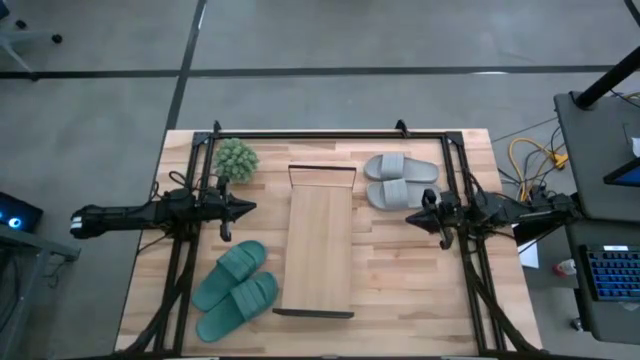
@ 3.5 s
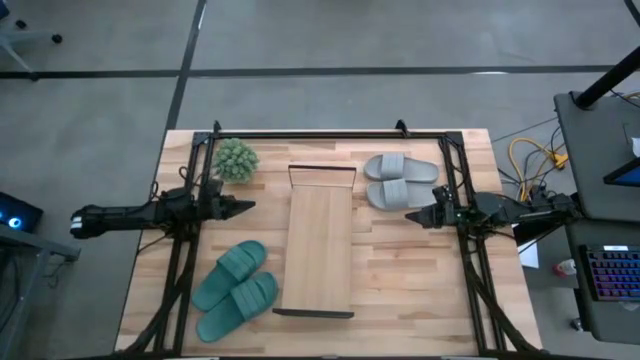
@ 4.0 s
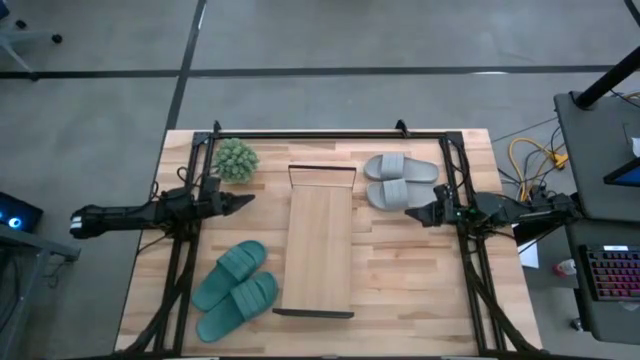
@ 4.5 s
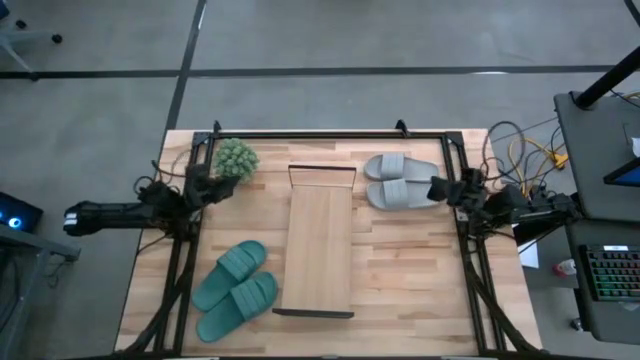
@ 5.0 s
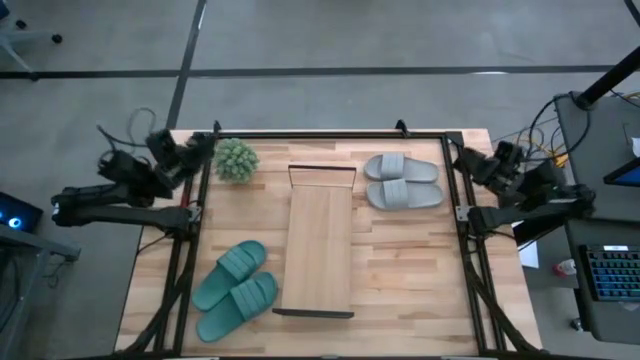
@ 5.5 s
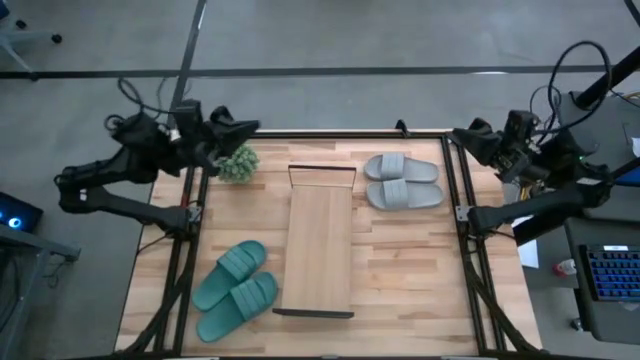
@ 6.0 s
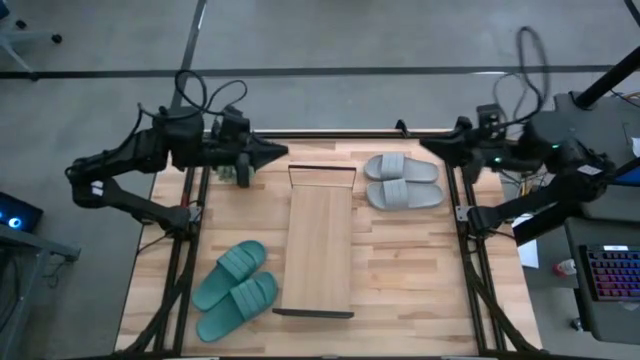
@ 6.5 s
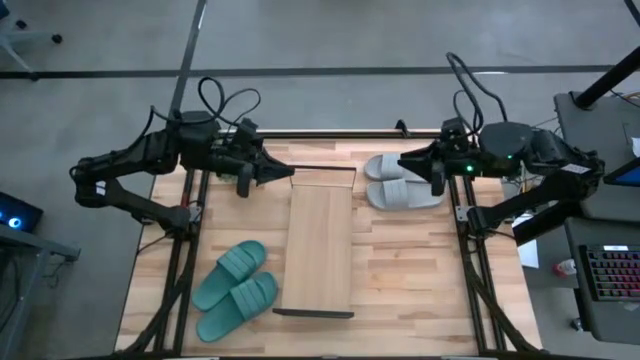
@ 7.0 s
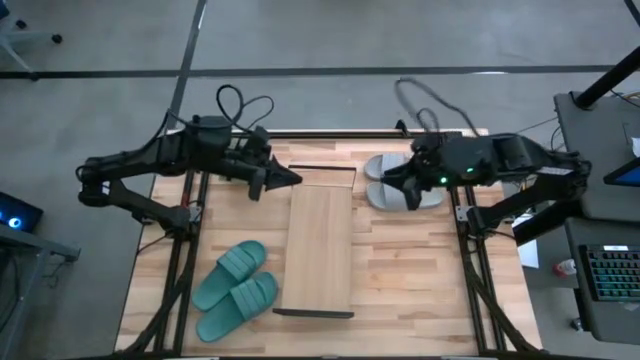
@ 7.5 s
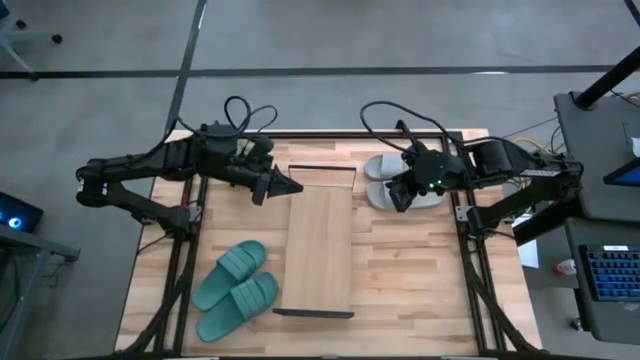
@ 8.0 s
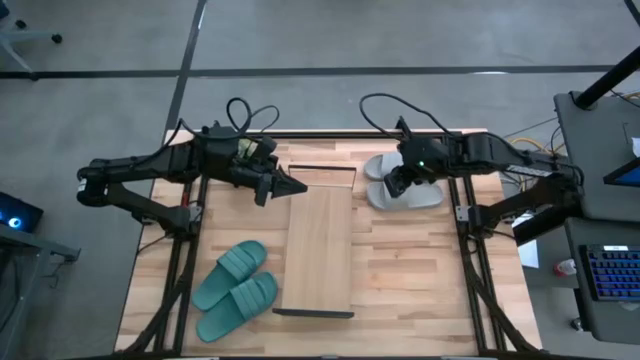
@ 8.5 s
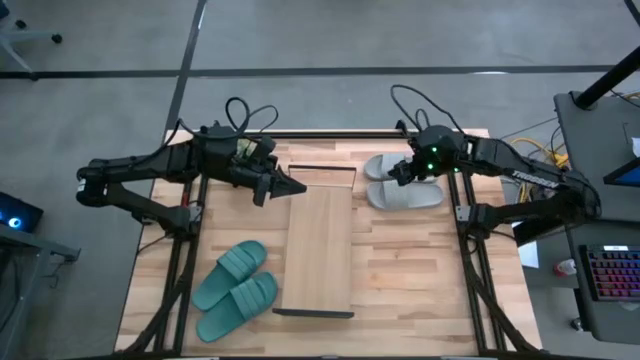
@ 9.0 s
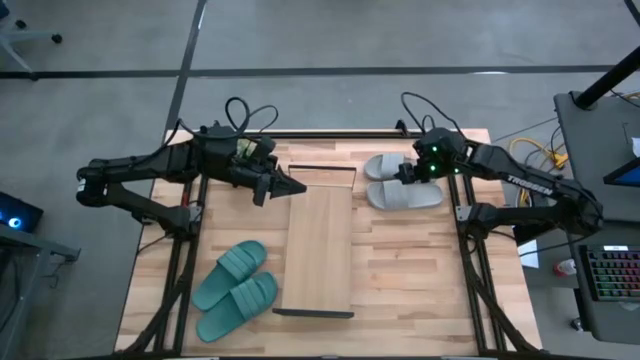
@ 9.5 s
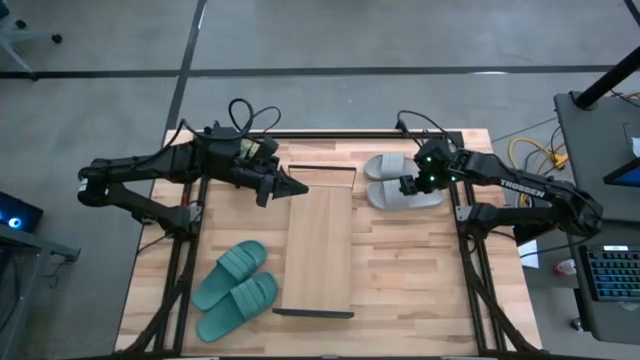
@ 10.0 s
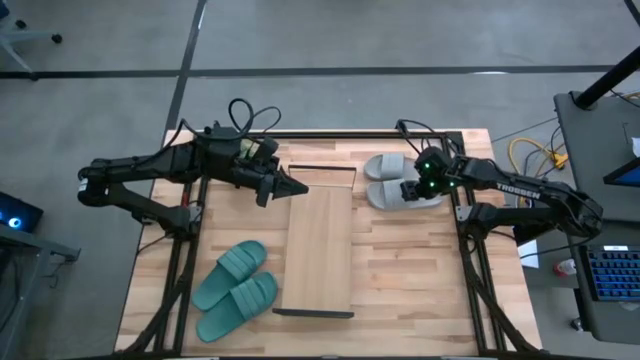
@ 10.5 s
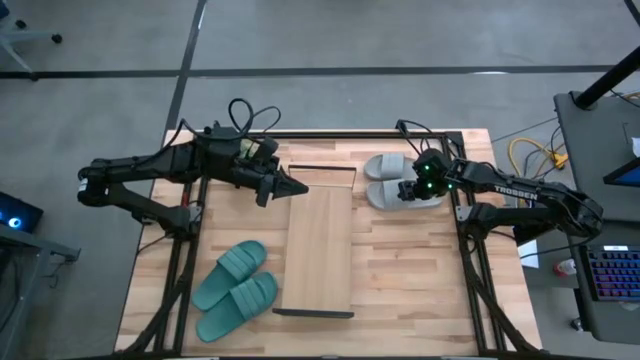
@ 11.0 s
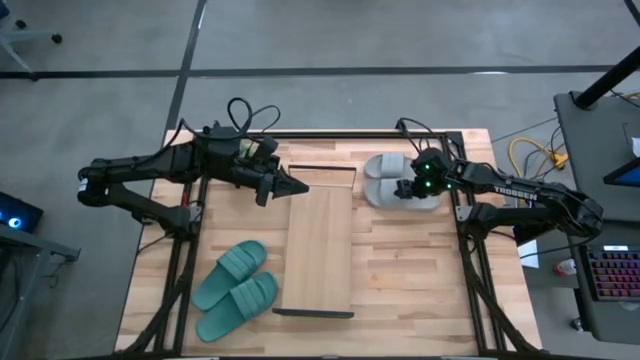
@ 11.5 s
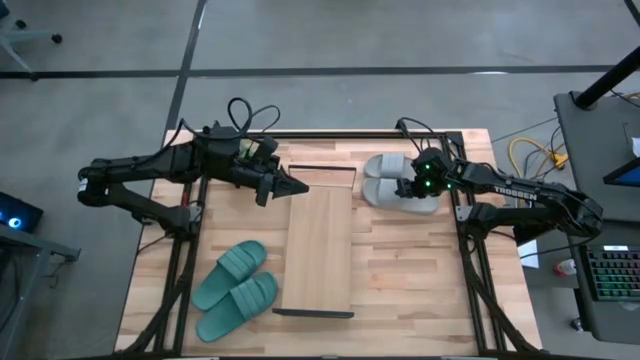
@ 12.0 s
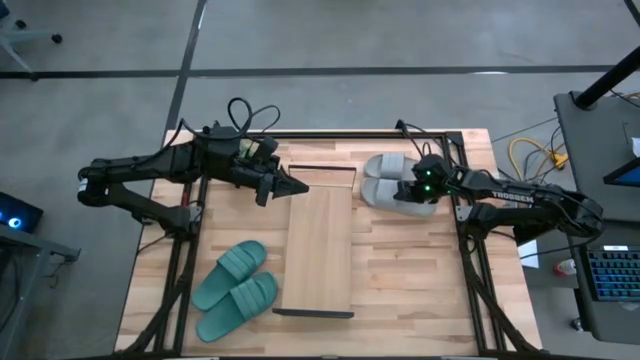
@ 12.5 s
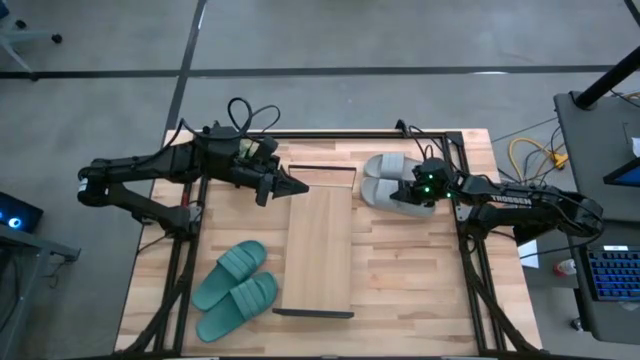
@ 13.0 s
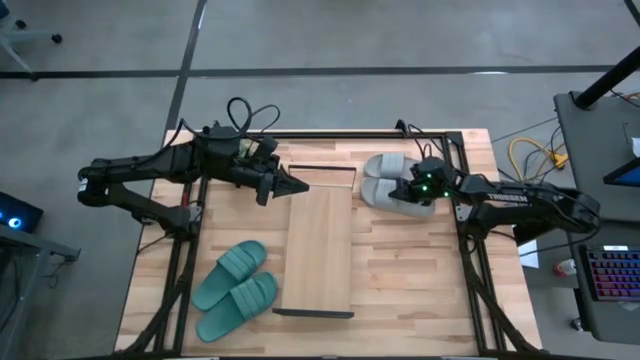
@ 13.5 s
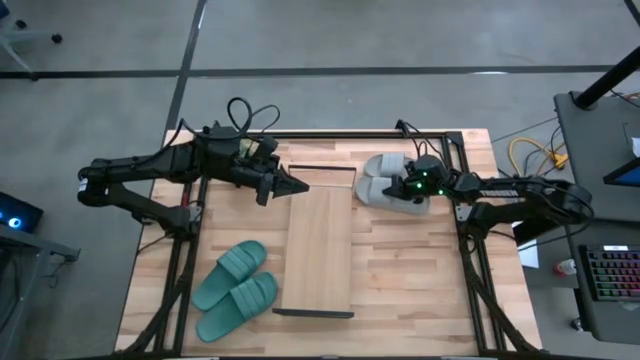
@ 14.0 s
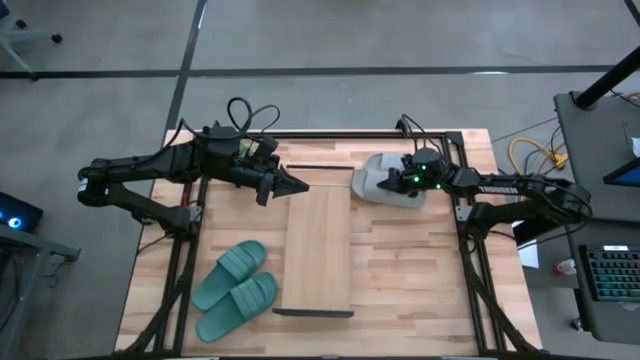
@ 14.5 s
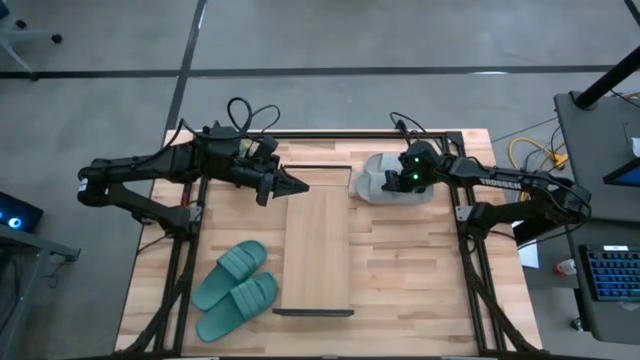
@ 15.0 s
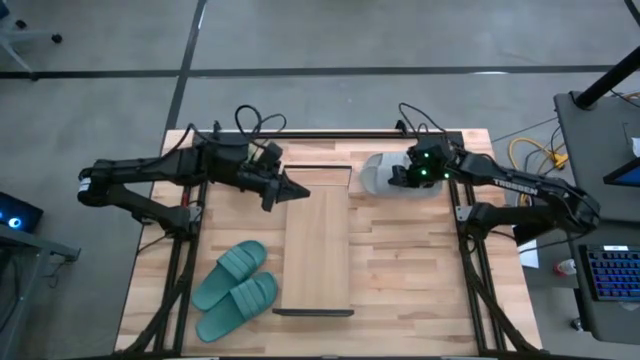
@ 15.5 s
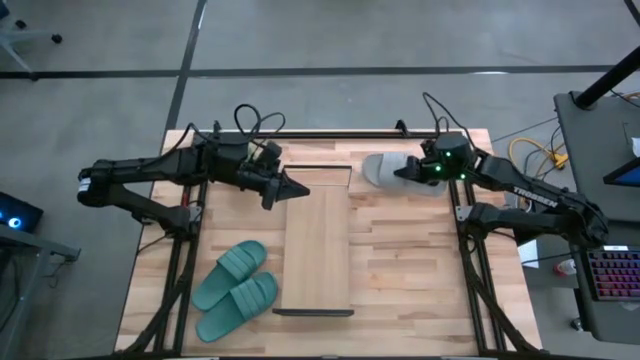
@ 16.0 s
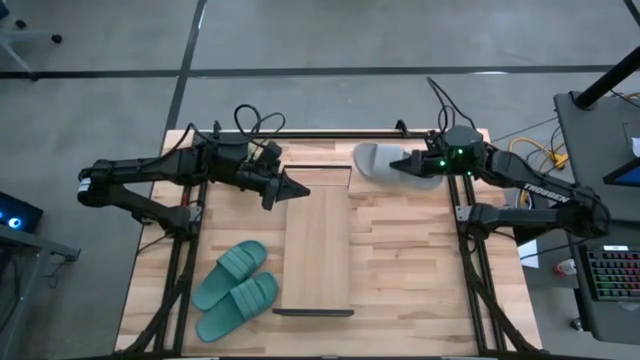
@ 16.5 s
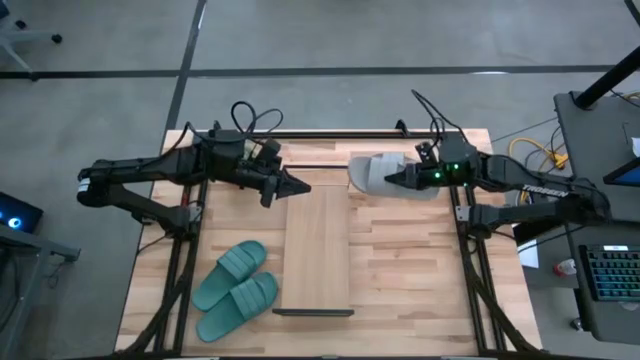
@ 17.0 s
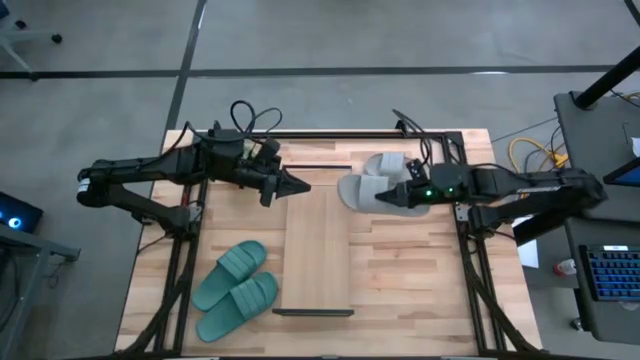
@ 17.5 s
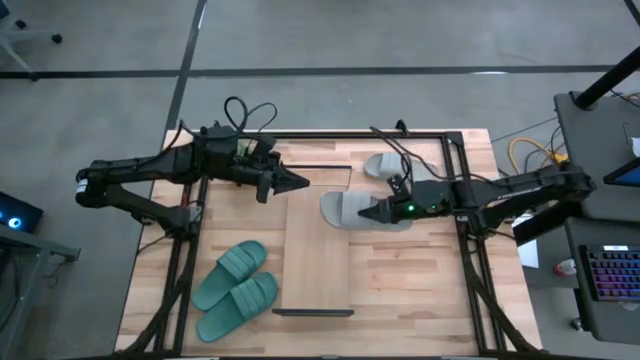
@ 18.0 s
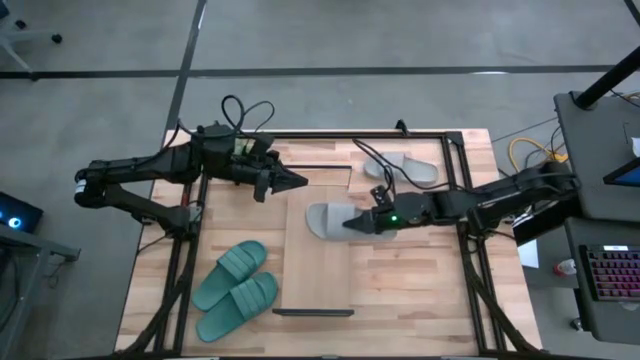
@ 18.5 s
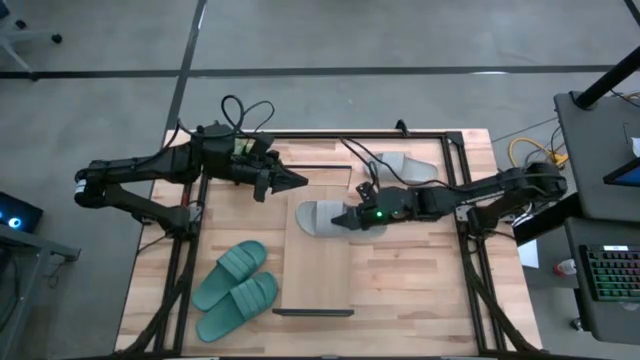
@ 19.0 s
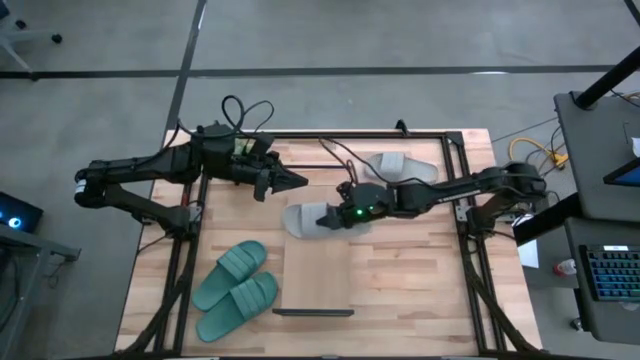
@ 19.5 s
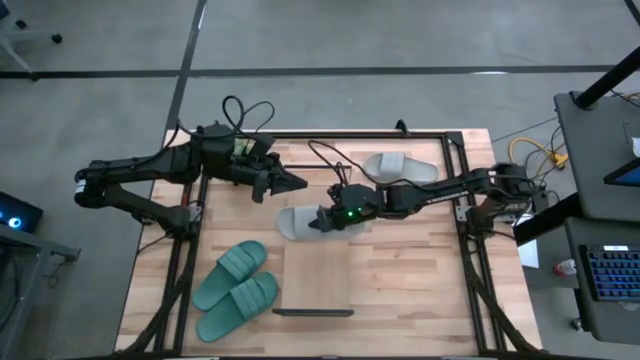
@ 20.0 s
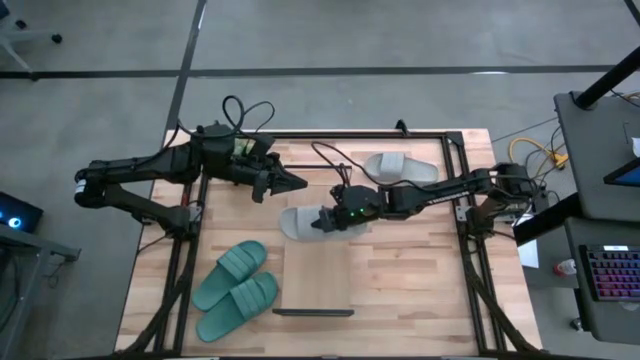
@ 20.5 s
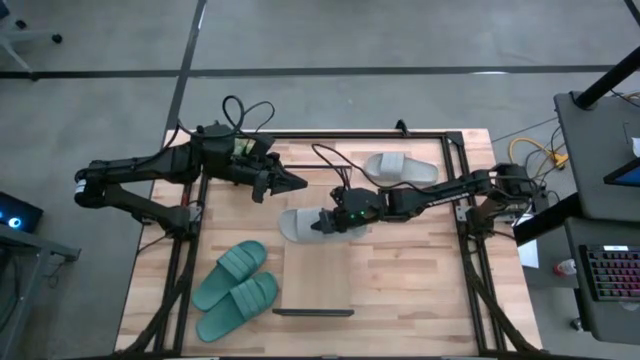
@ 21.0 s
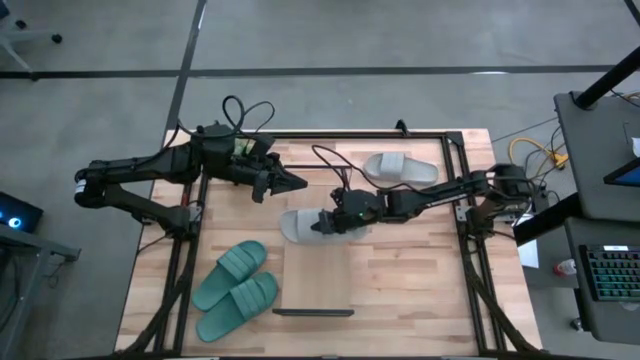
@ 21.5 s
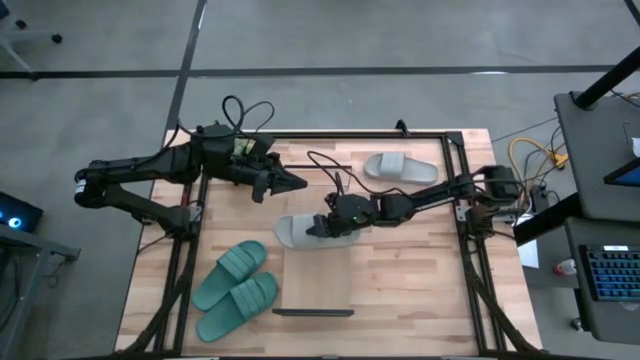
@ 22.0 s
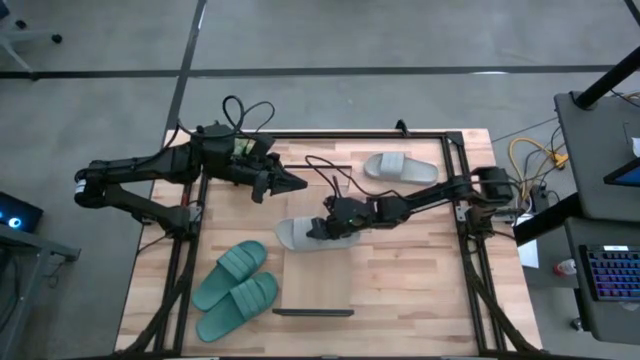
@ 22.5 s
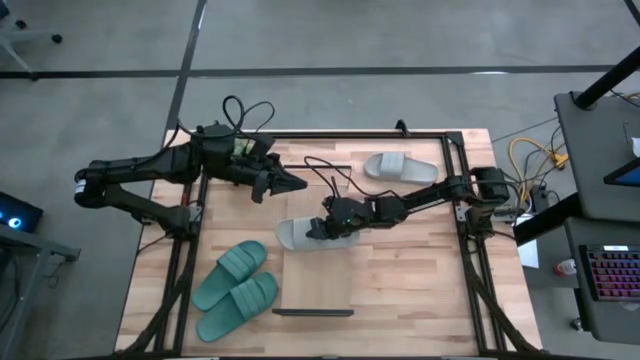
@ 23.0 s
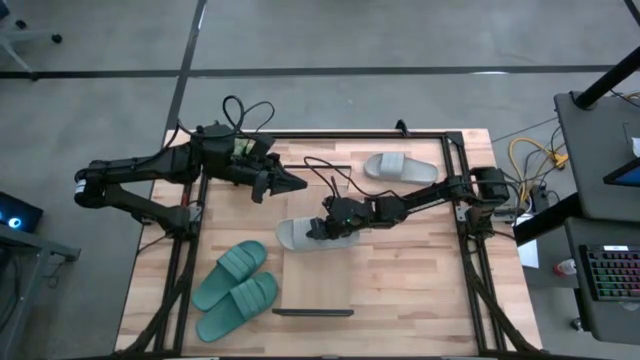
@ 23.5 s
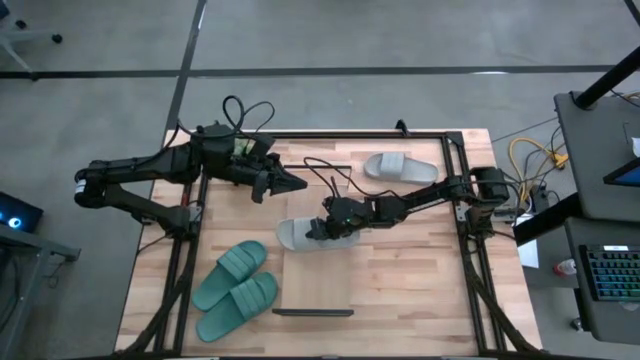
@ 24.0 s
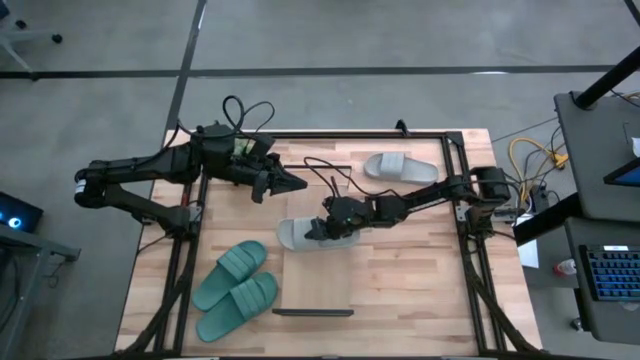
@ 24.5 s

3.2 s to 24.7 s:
Task: Pick and place slides into the shelf
Put the gray slippers on the shelf
